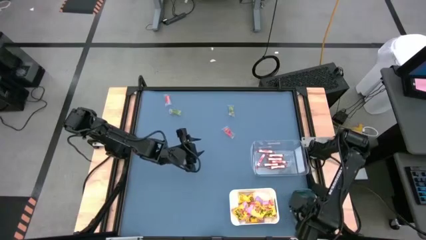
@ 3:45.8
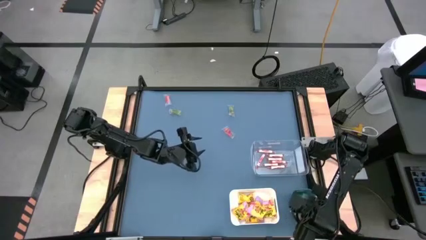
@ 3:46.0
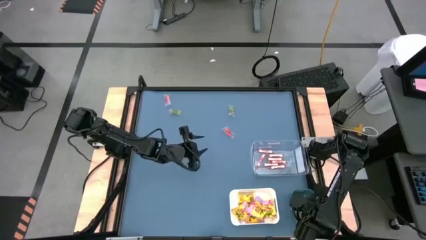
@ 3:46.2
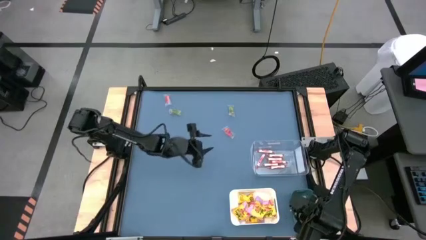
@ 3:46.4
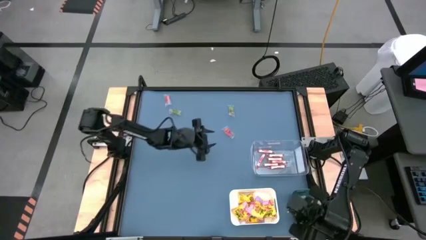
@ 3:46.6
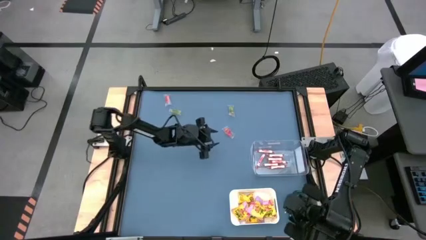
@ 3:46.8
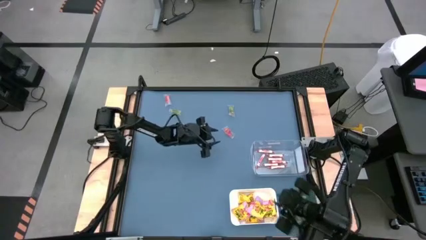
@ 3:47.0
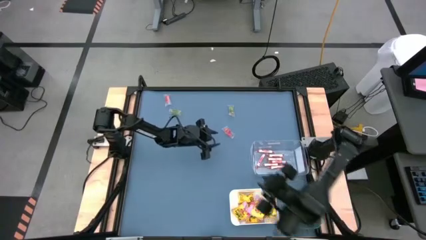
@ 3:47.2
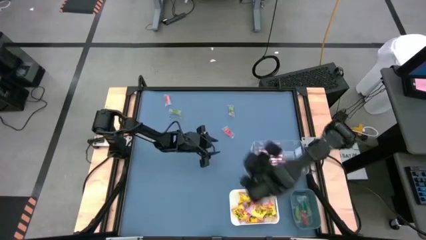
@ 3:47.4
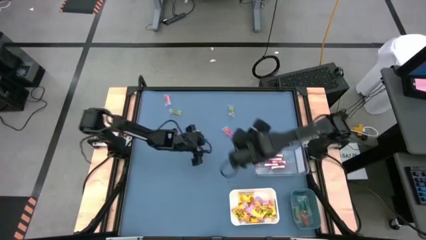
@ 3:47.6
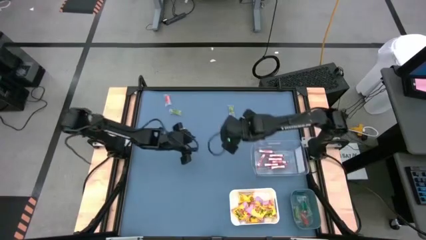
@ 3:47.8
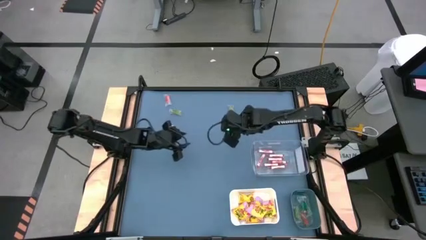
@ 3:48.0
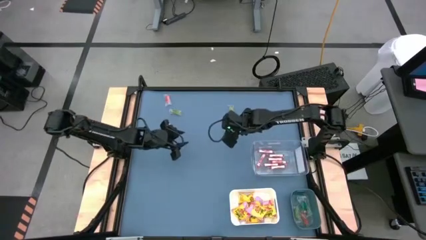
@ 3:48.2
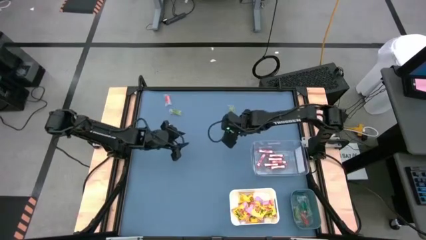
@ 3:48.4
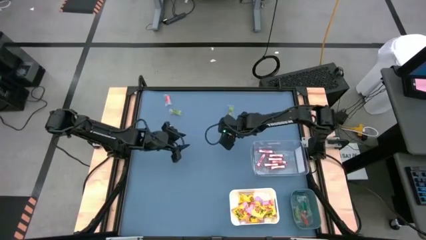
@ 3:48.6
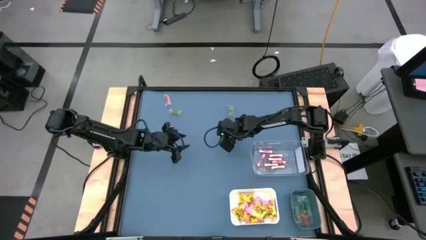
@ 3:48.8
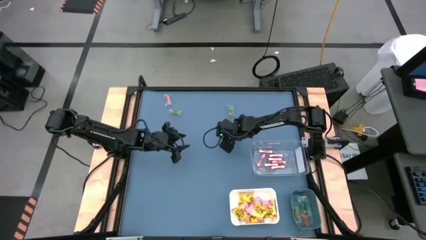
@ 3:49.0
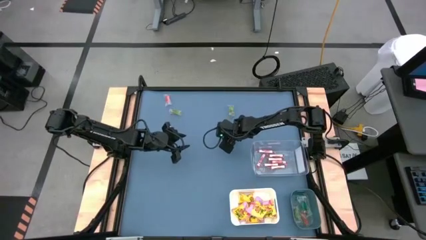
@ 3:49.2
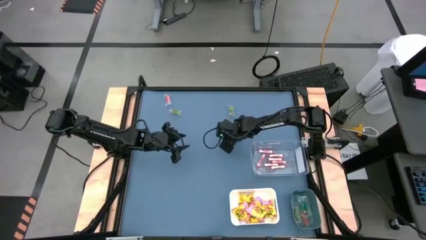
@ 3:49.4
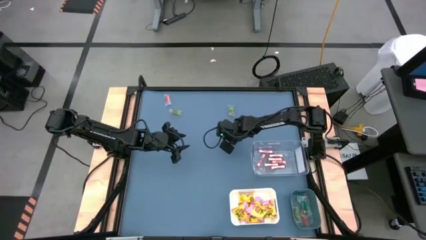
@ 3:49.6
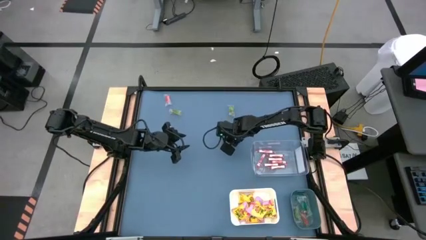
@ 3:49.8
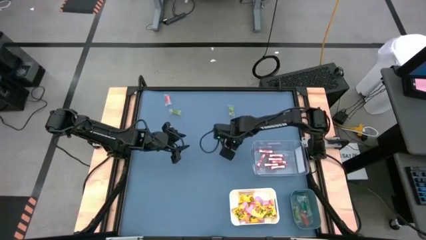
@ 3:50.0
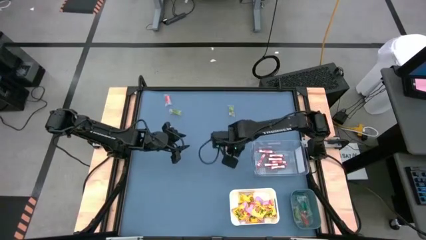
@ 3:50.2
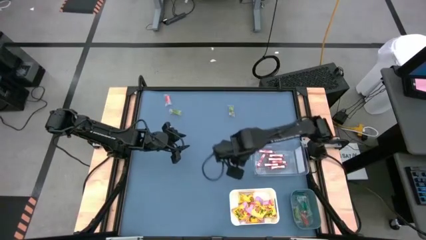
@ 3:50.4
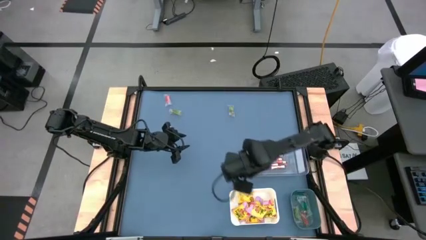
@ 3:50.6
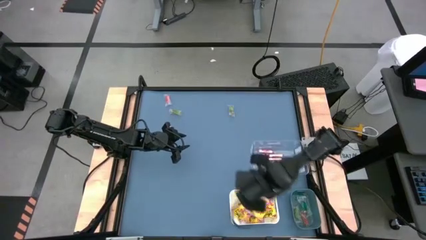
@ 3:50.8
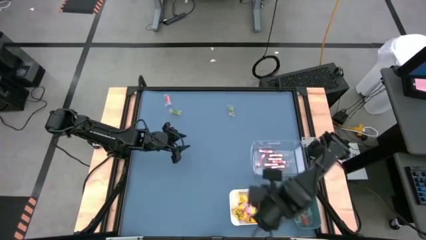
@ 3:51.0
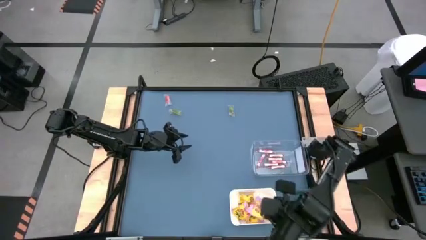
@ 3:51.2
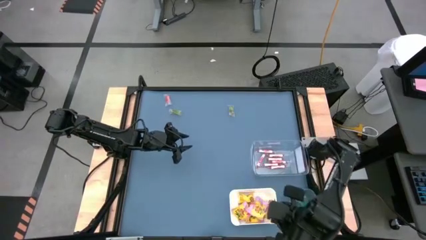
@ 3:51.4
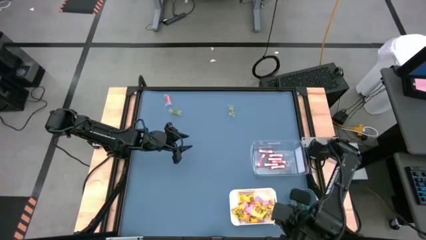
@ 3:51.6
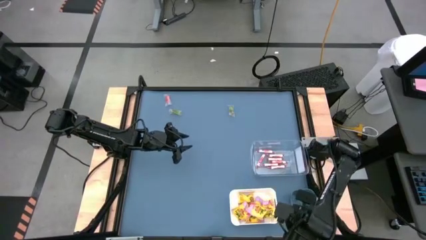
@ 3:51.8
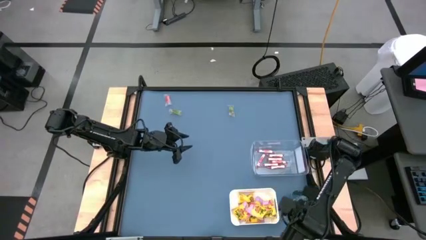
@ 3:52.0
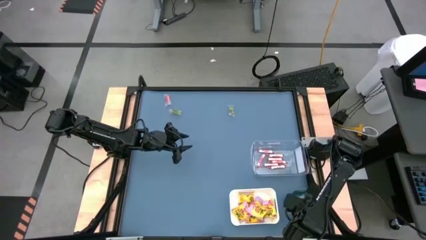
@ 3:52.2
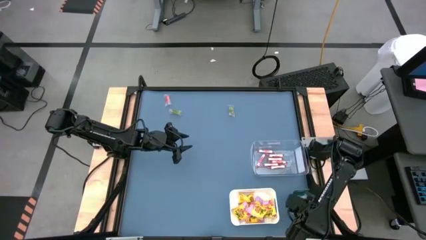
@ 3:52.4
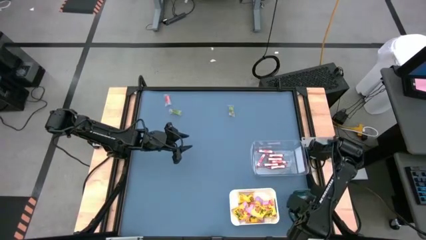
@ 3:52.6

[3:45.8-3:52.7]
Task: Sort candy
Put the red gummy into the blue bin

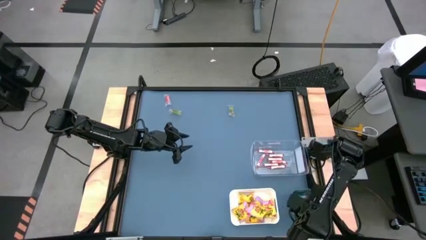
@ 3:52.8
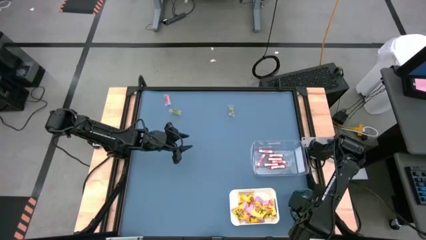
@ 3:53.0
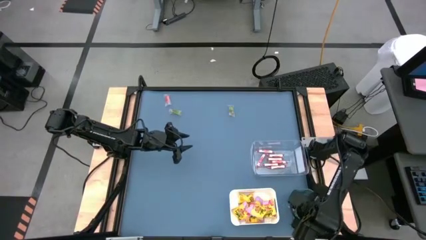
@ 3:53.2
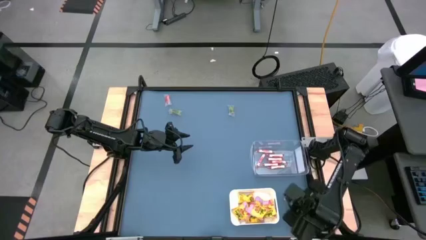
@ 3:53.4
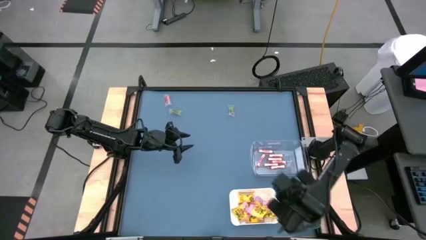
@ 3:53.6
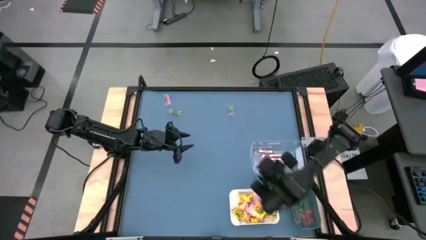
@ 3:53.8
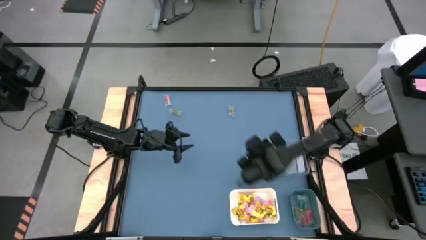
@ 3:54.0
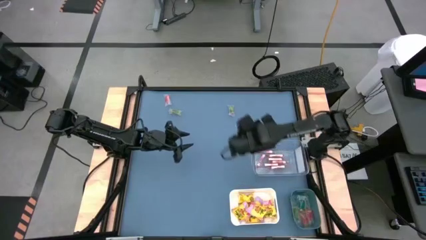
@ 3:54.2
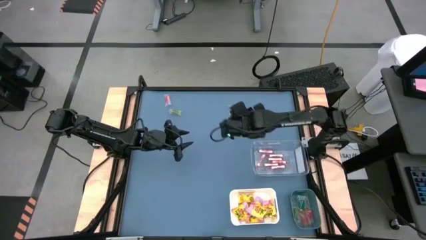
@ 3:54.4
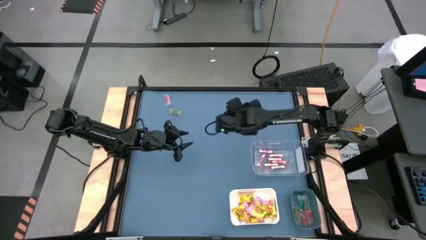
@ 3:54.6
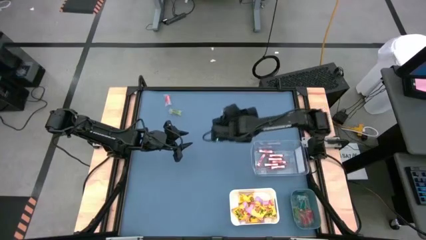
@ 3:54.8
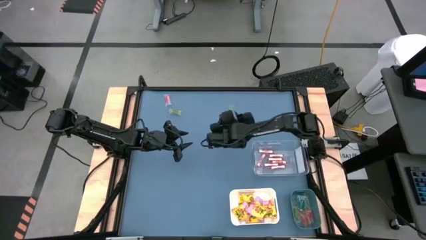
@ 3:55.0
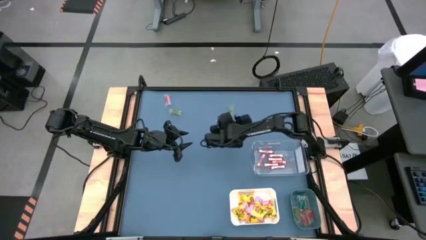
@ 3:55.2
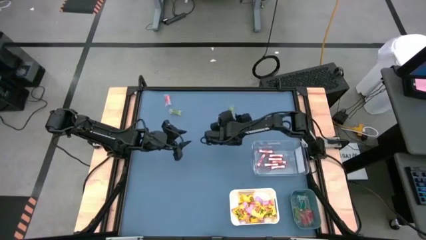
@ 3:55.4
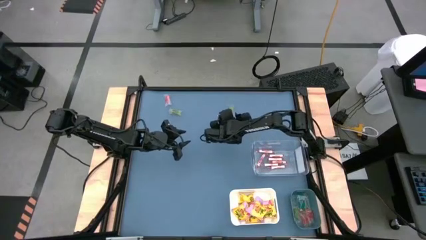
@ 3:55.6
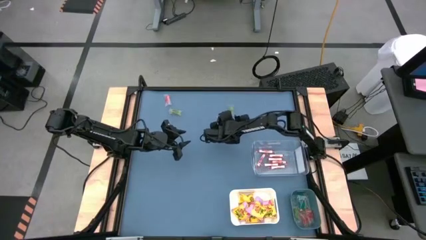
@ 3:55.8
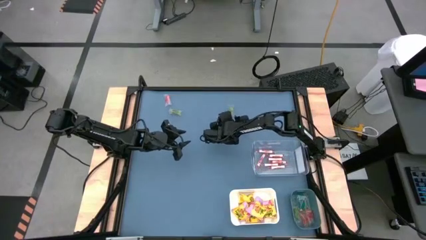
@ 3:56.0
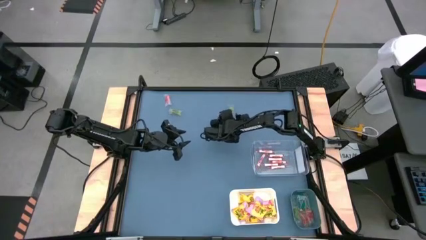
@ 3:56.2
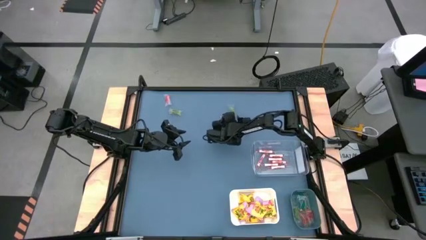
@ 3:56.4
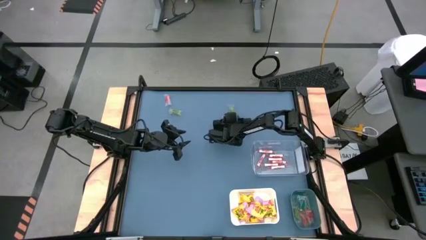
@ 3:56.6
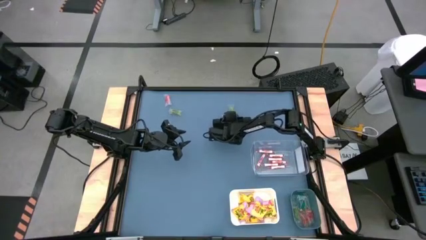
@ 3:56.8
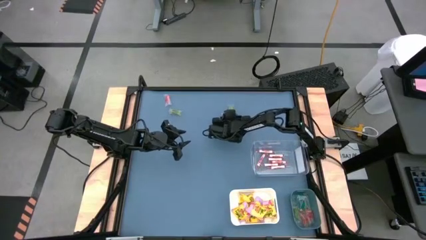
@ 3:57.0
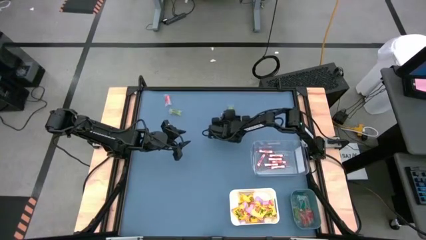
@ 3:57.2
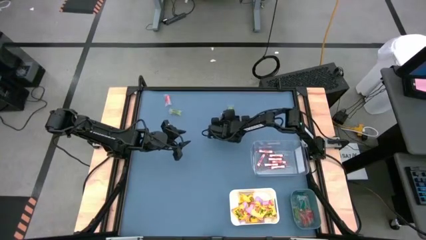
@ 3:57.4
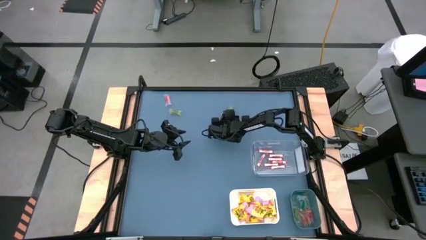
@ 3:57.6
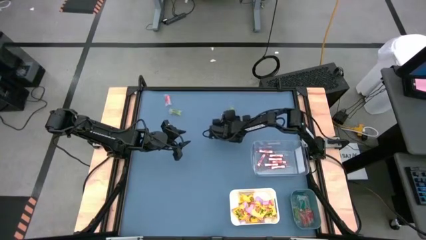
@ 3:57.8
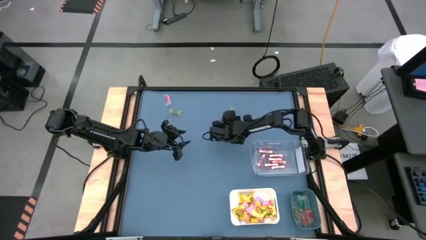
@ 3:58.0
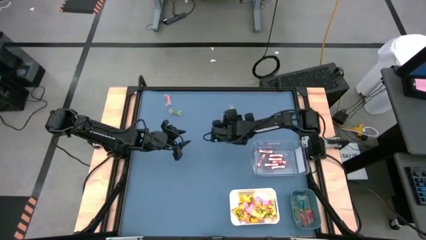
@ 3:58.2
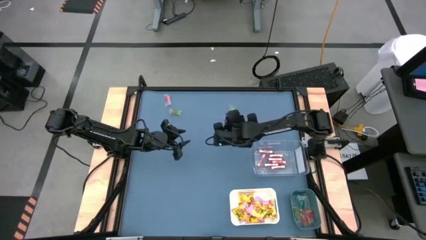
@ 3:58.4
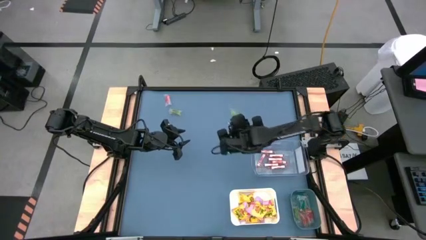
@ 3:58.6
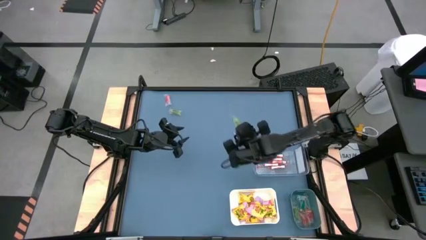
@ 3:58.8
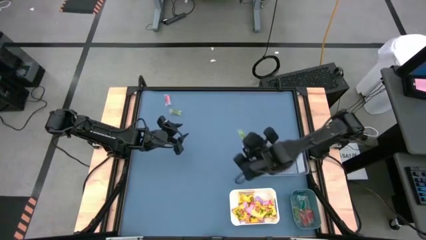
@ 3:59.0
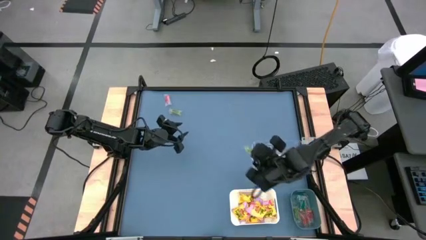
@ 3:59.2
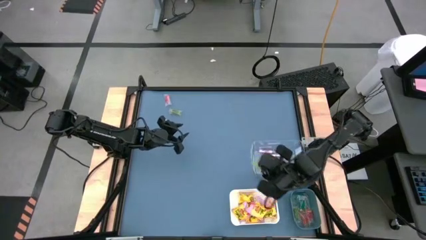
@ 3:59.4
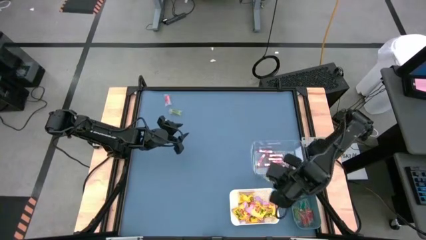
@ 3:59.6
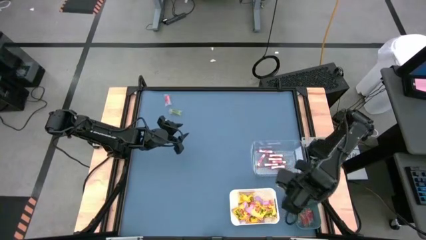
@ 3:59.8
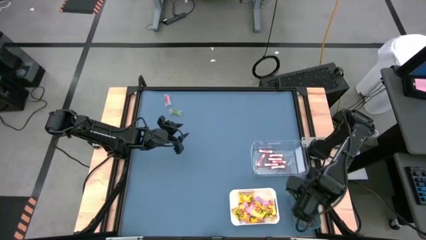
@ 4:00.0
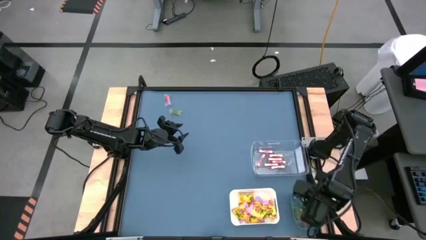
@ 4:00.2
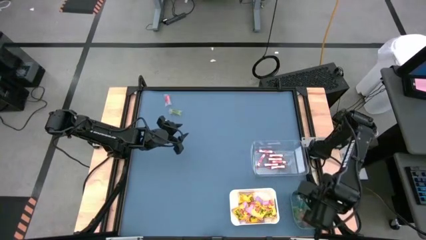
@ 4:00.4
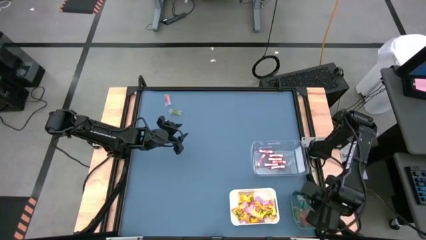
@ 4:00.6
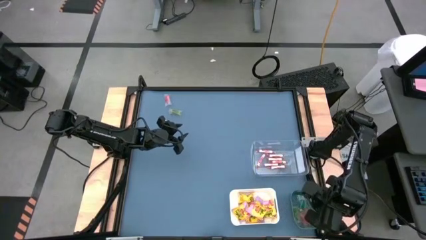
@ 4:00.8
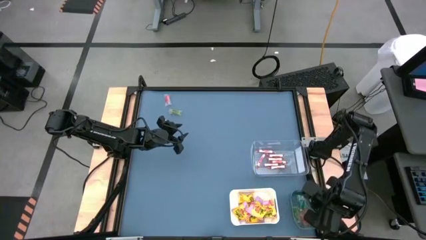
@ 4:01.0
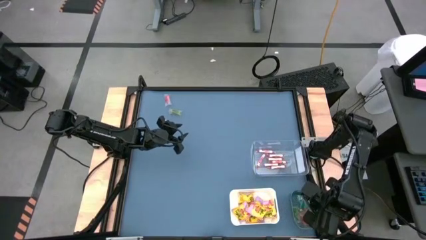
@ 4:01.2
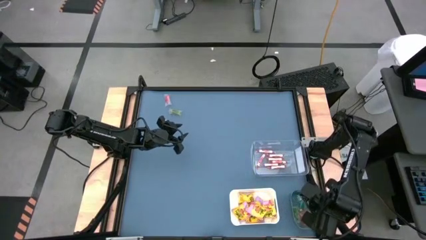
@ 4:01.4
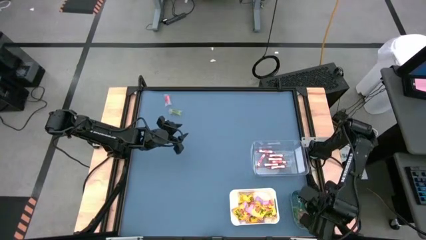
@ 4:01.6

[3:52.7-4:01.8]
Put the green gummy into the blue bin
